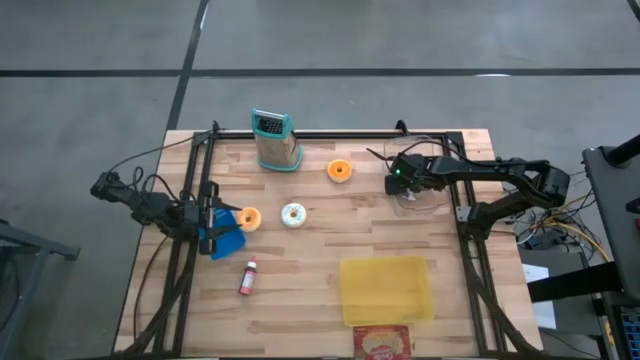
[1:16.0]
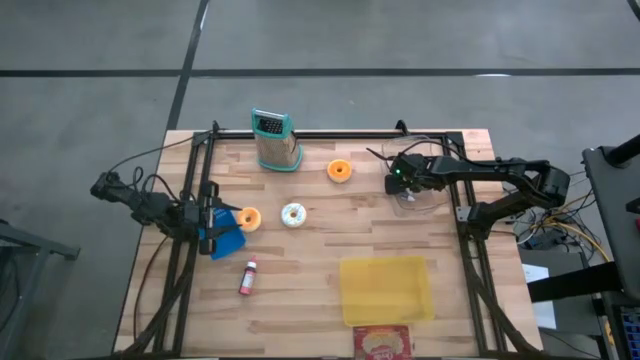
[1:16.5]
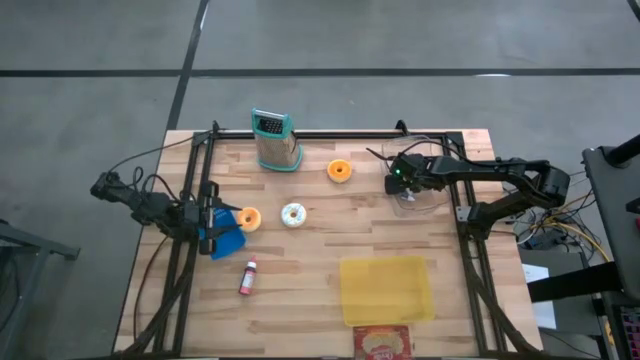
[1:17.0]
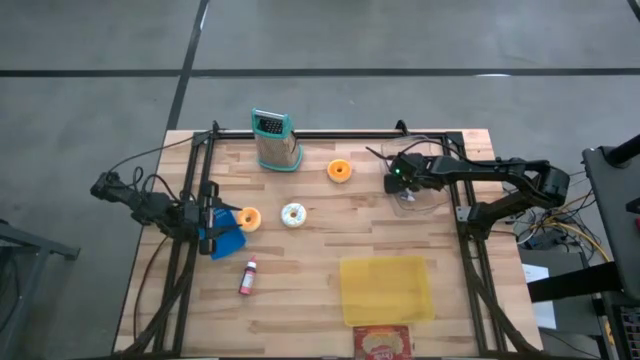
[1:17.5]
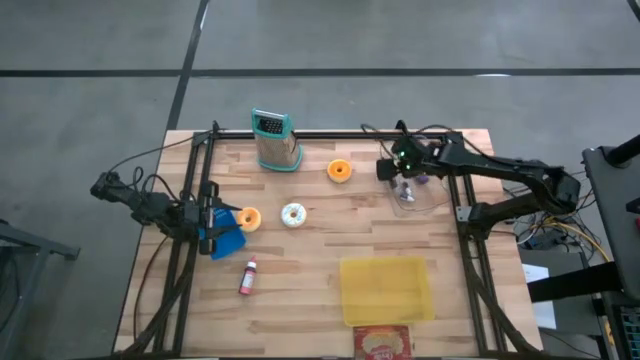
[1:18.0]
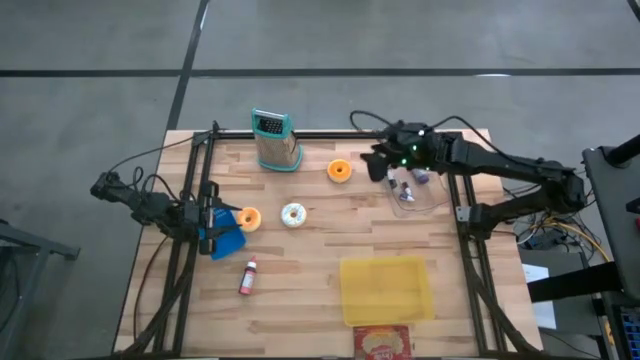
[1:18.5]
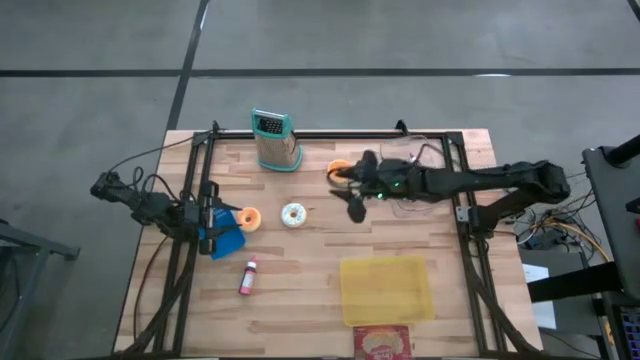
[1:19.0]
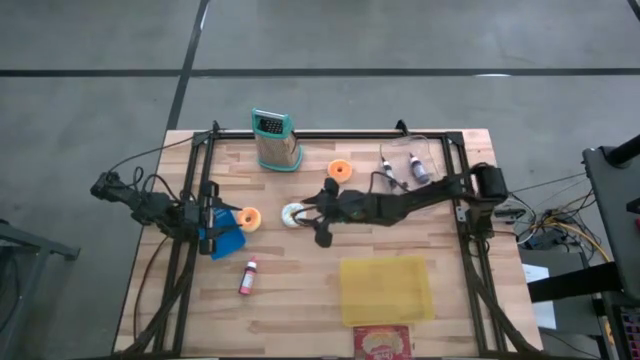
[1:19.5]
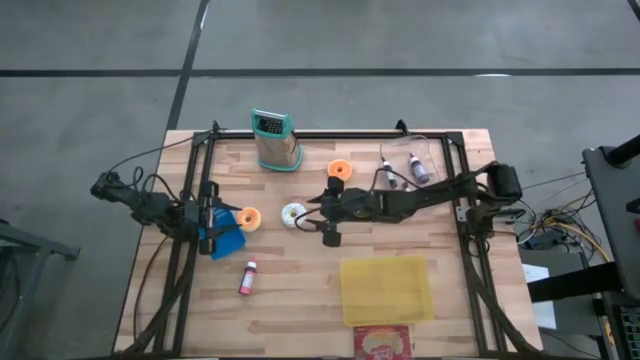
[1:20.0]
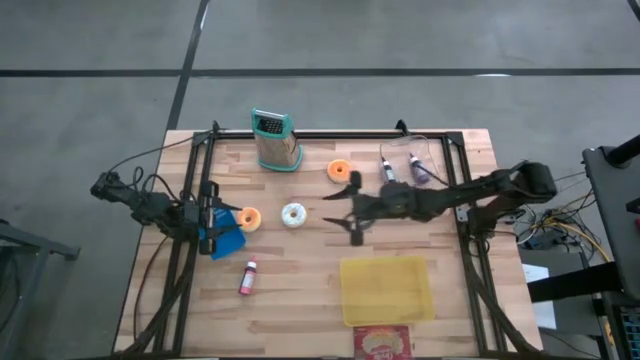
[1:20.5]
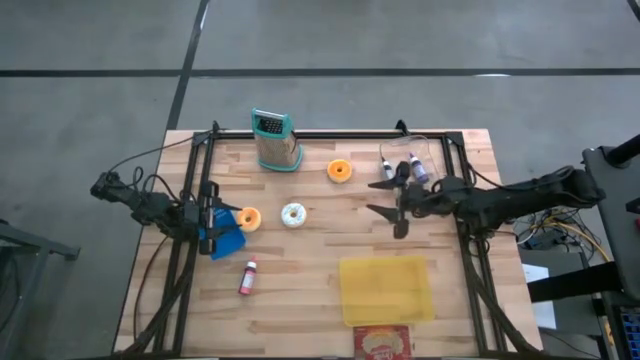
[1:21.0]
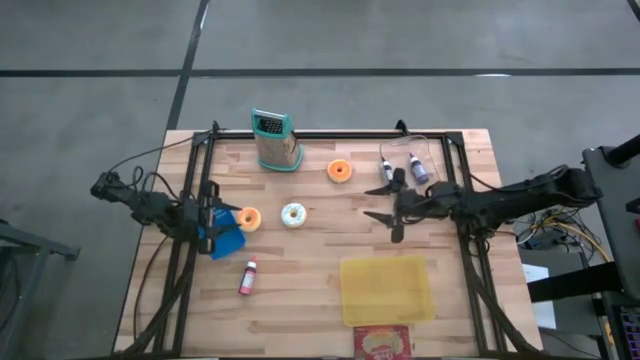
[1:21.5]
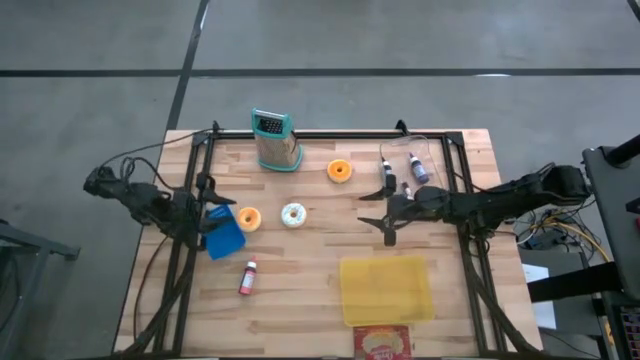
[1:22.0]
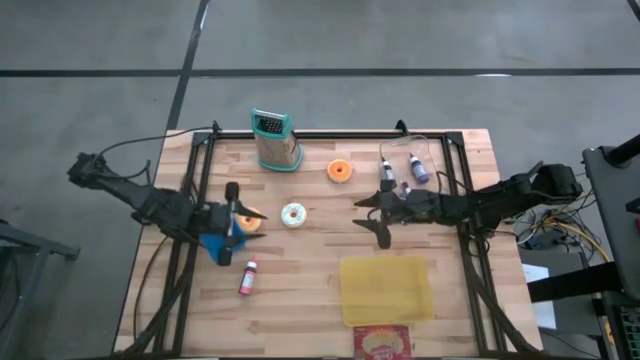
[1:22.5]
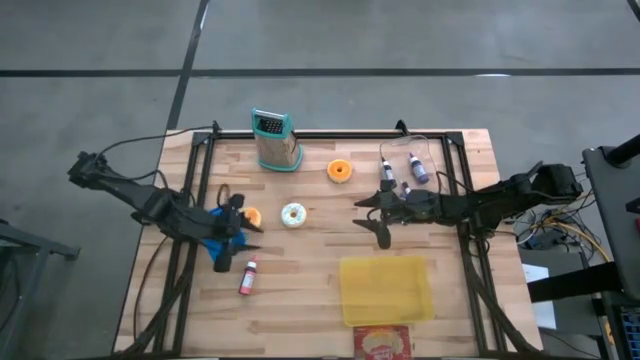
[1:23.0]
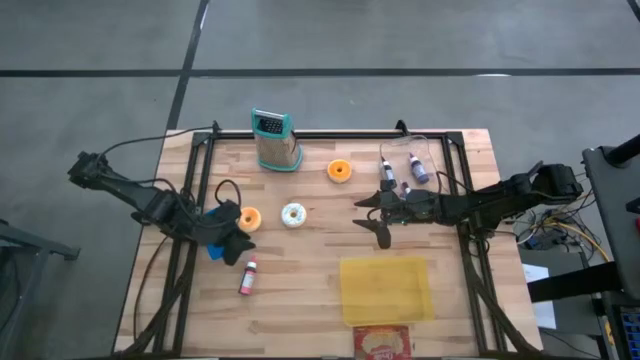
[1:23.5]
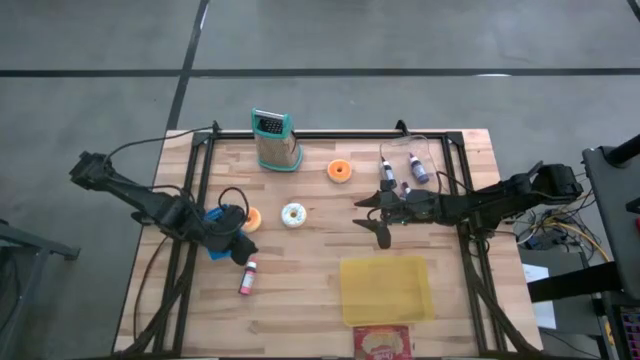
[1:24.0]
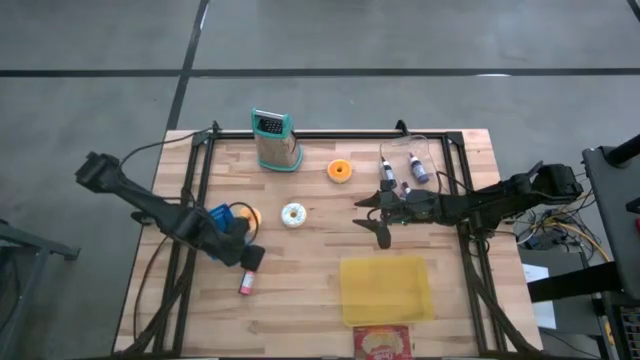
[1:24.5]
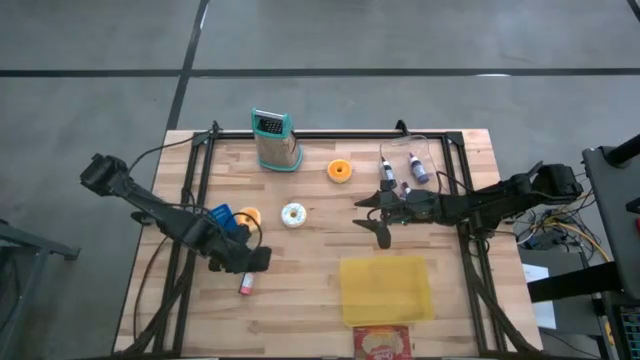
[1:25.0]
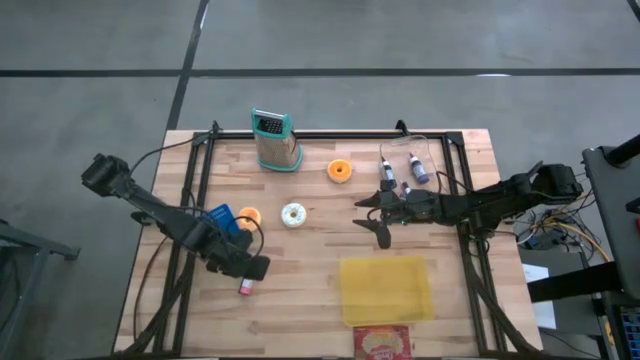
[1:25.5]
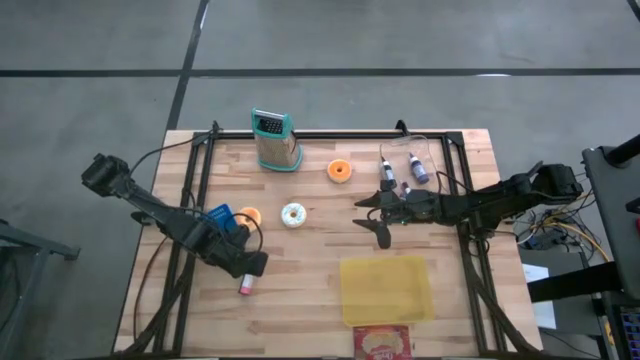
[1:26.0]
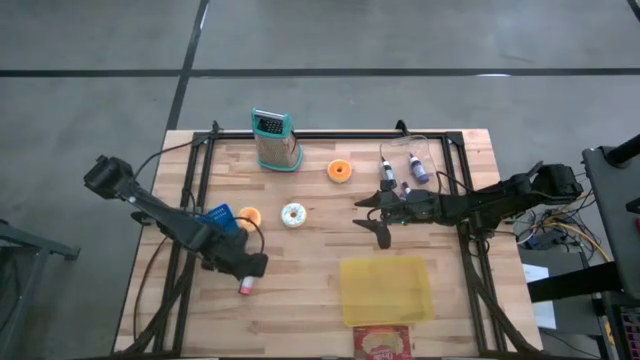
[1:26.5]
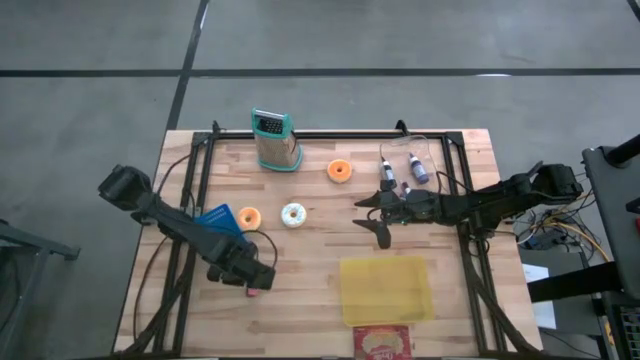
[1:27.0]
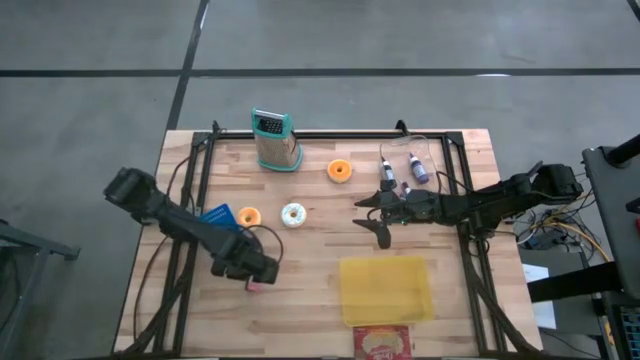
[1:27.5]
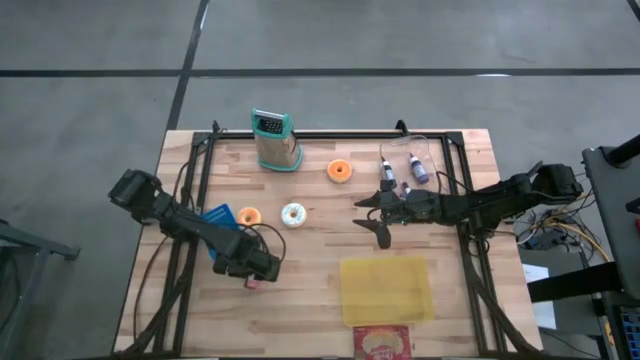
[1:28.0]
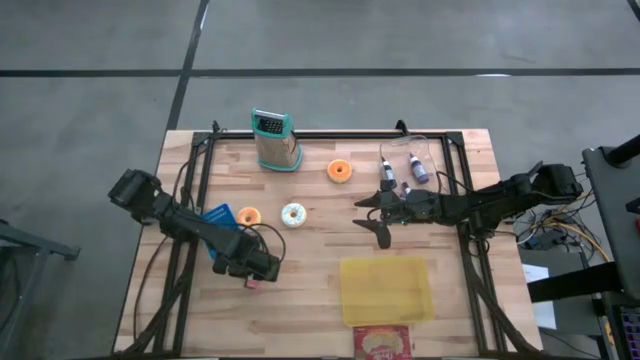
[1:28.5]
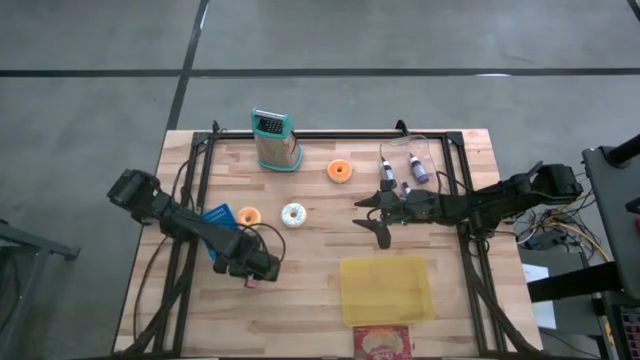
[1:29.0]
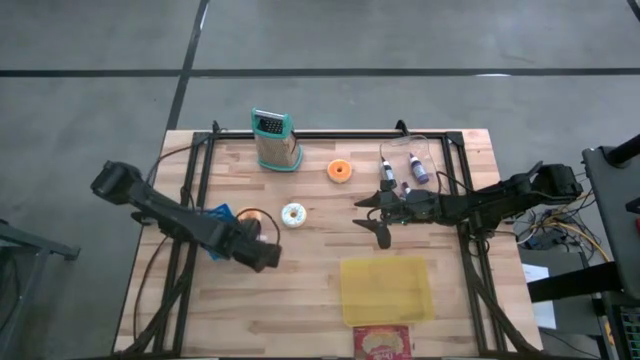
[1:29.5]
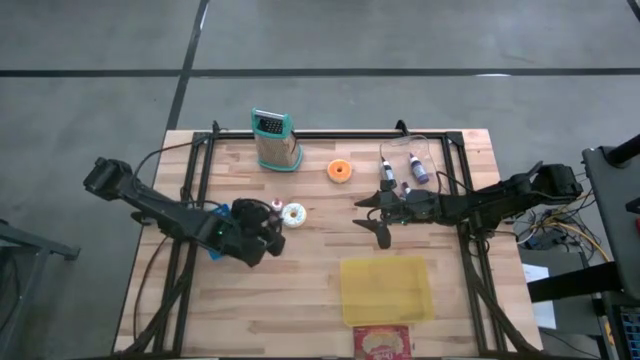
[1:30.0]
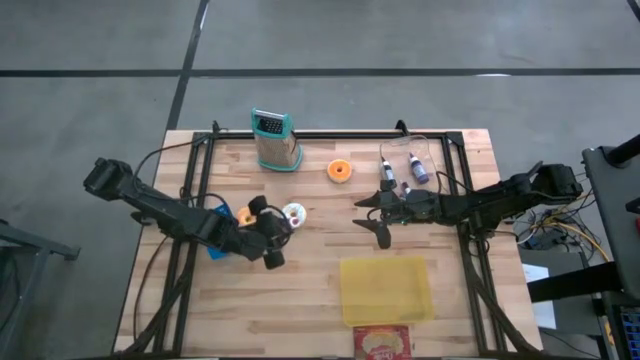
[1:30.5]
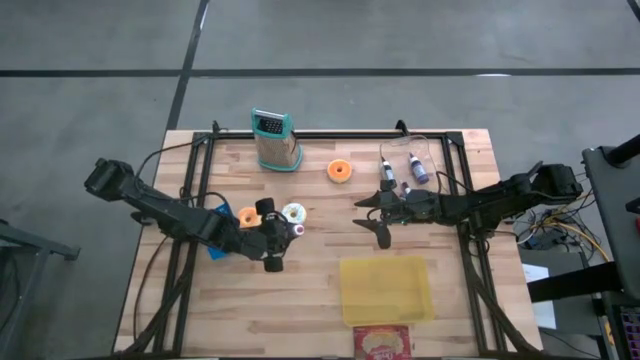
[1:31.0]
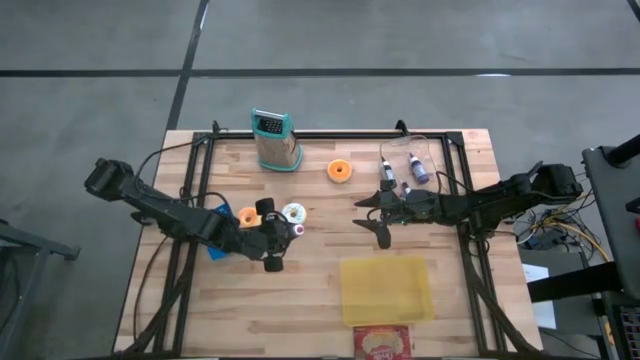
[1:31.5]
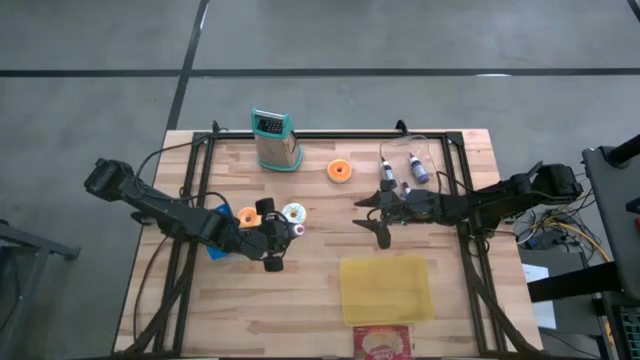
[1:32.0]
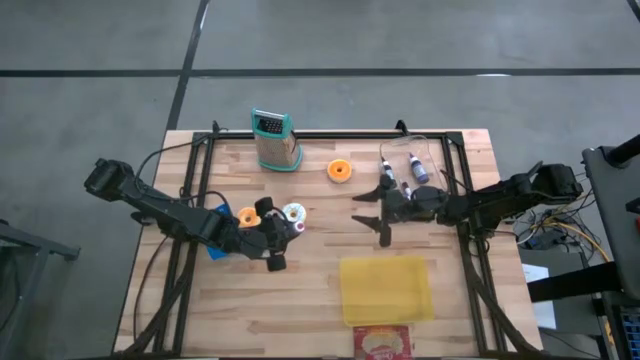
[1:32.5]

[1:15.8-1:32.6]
Task: Pick & Place Food Item
Put the pink food coloring bottle into the transparent bin

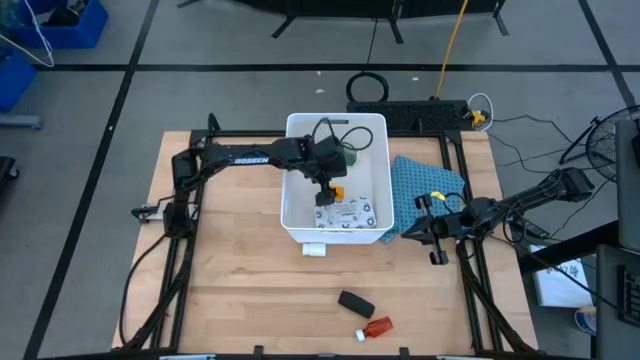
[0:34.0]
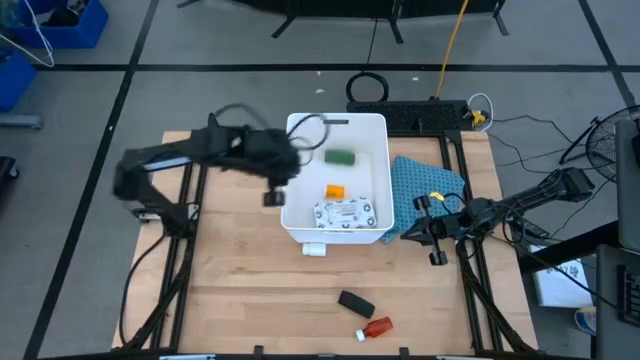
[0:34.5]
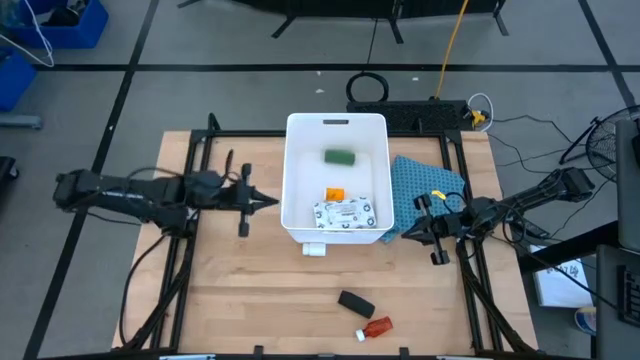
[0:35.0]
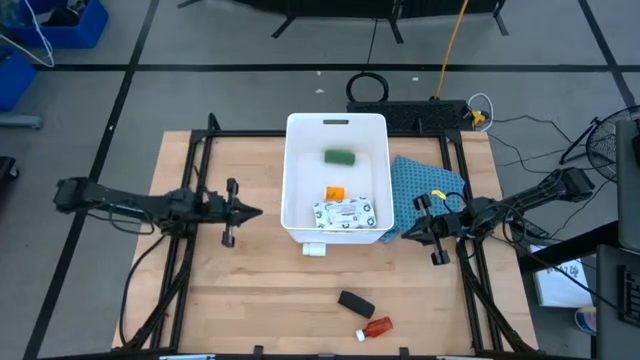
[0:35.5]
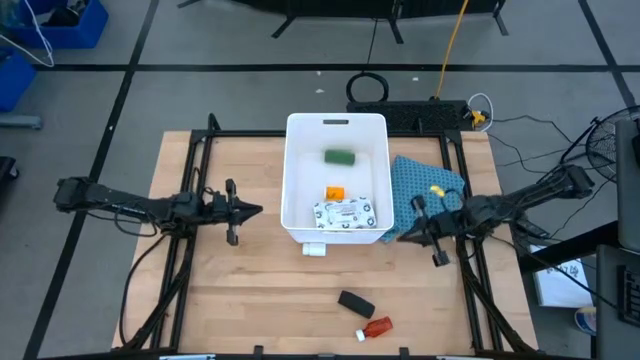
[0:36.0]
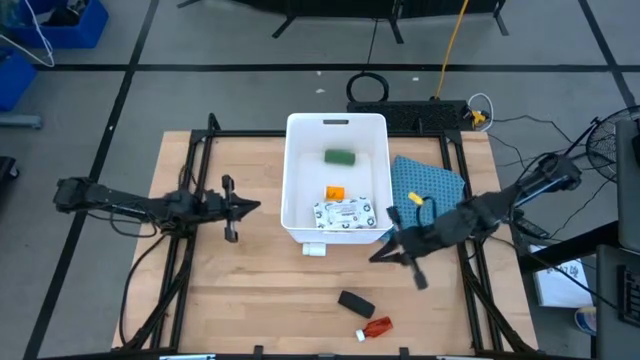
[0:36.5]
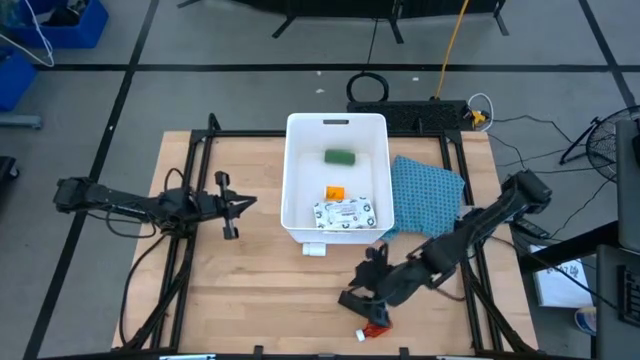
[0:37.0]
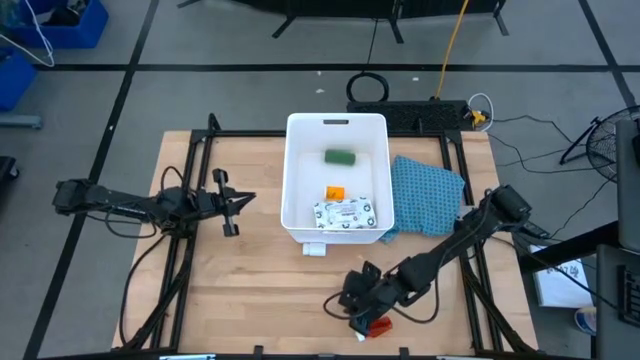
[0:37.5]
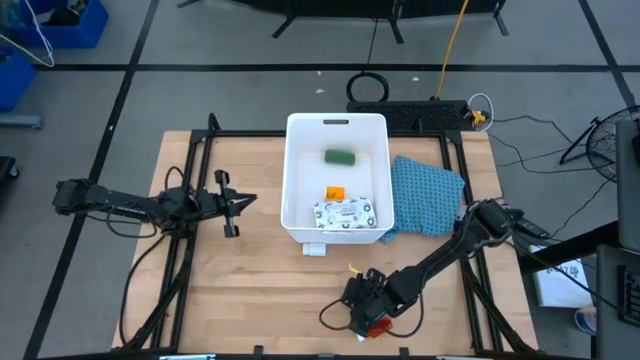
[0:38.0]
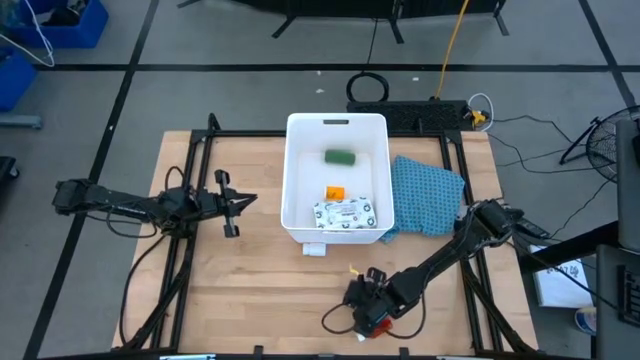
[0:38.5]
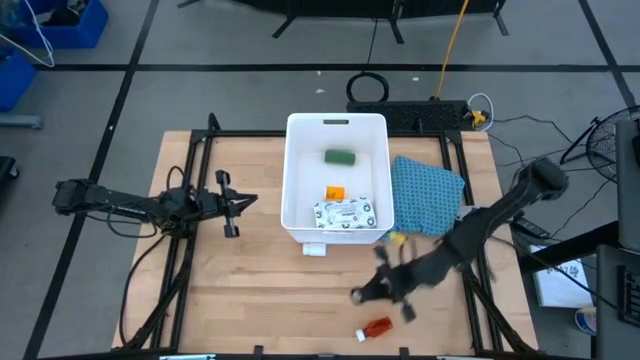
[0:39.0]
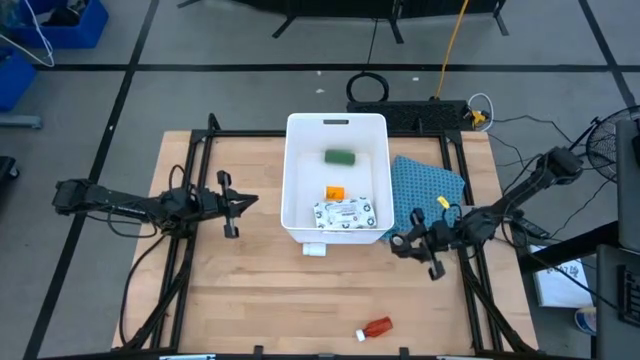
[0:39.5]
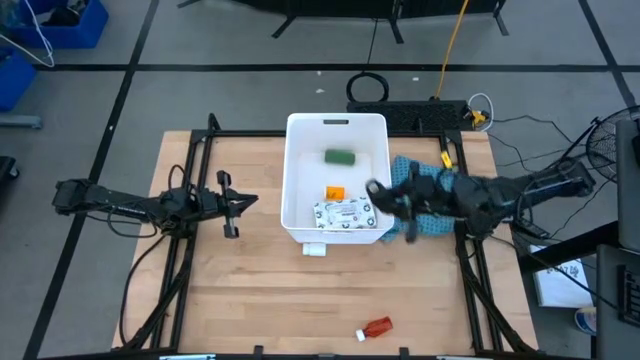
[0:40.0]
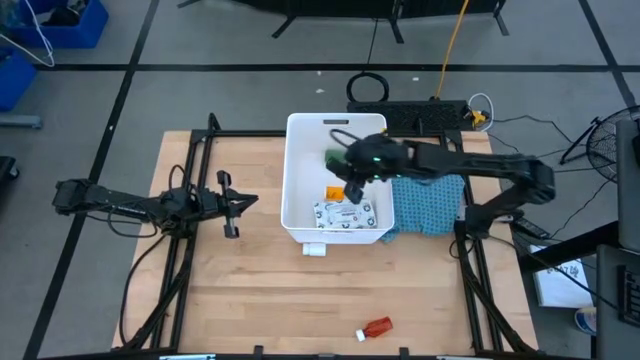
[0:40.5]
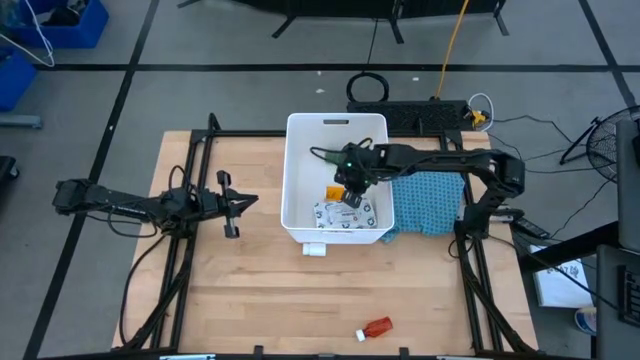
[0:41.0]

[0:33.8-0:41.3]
Task: Pick & place medical supplies in basket/bin
Put the black bandage into the bin
